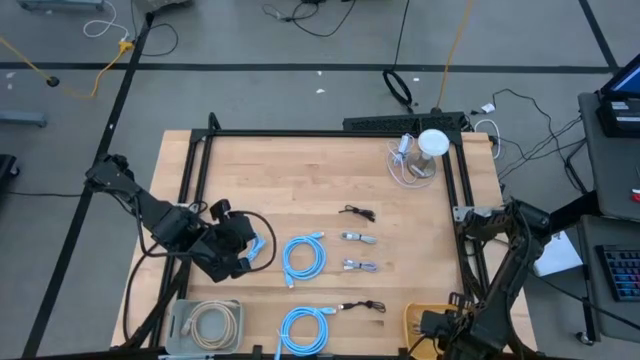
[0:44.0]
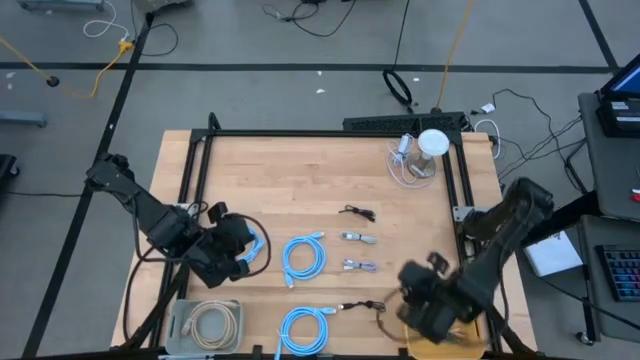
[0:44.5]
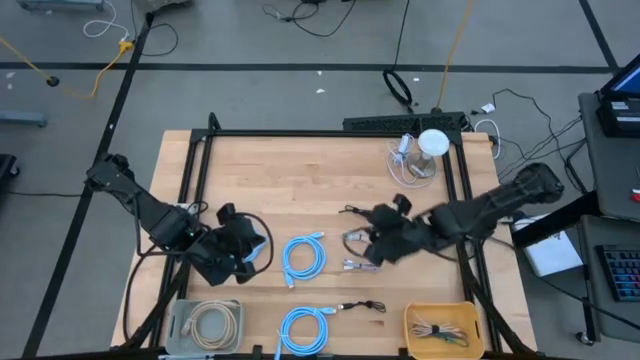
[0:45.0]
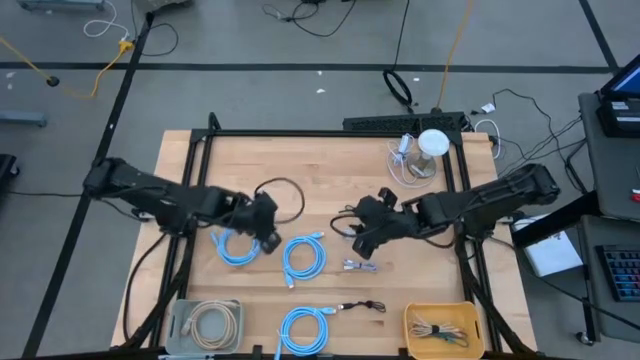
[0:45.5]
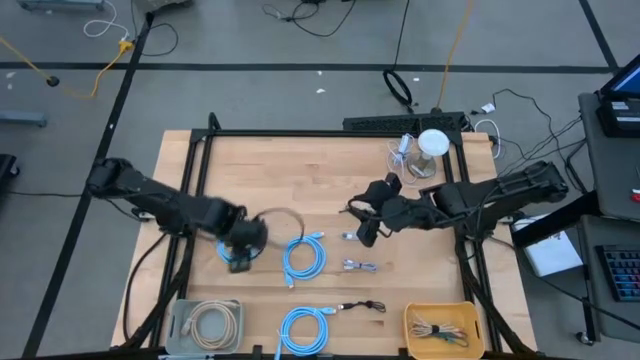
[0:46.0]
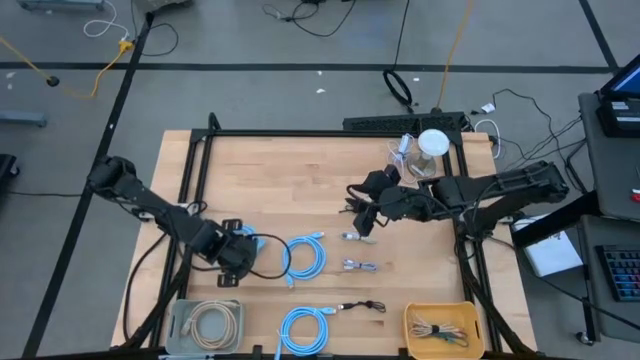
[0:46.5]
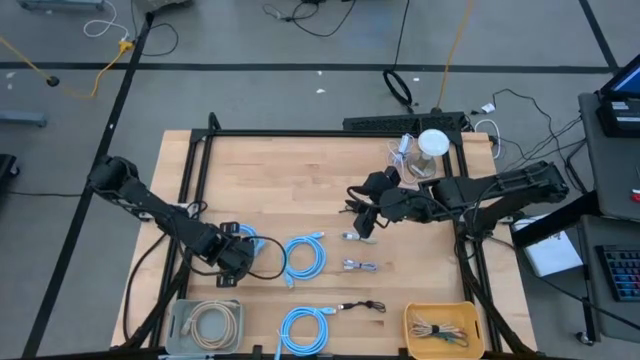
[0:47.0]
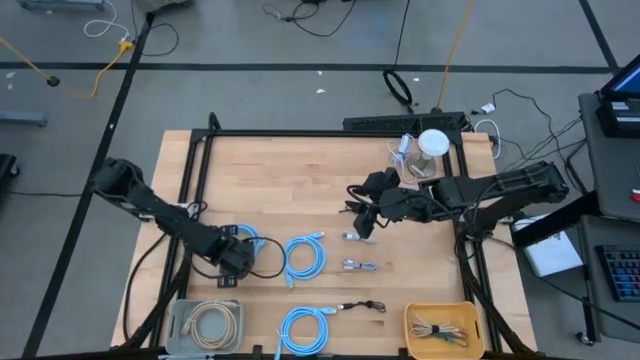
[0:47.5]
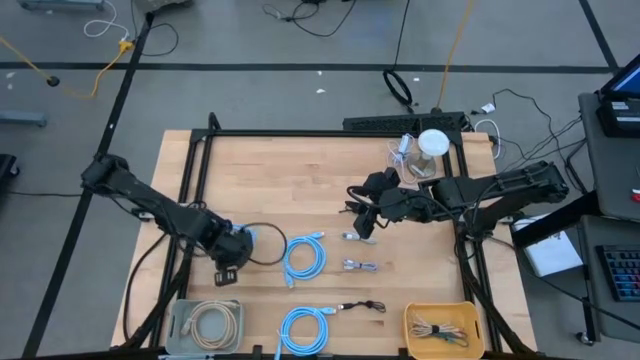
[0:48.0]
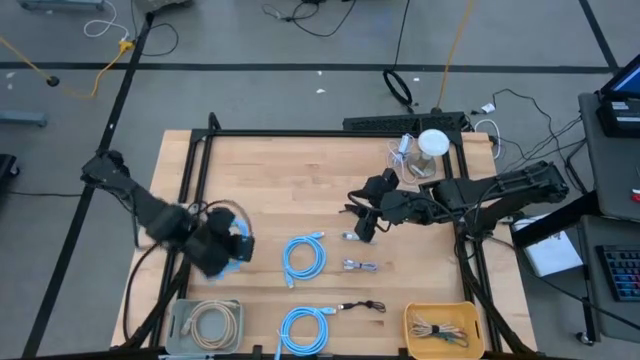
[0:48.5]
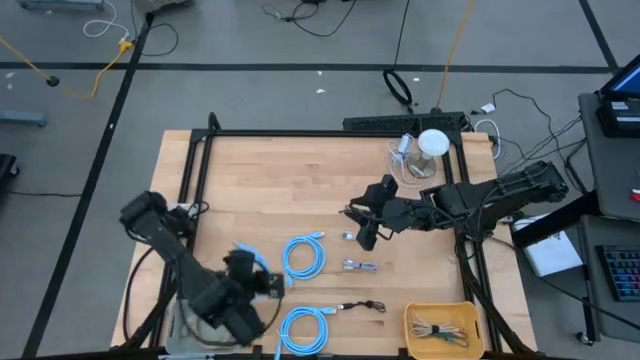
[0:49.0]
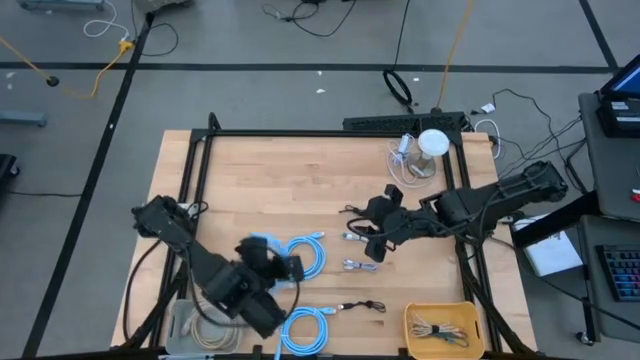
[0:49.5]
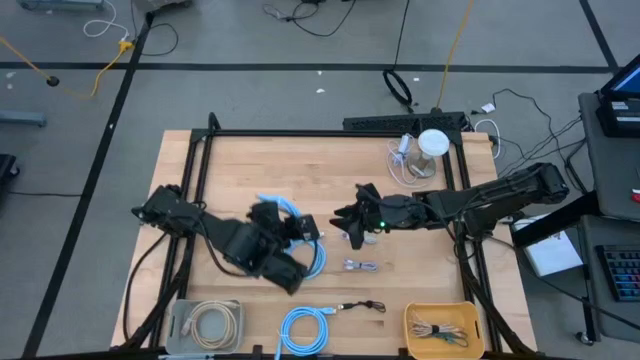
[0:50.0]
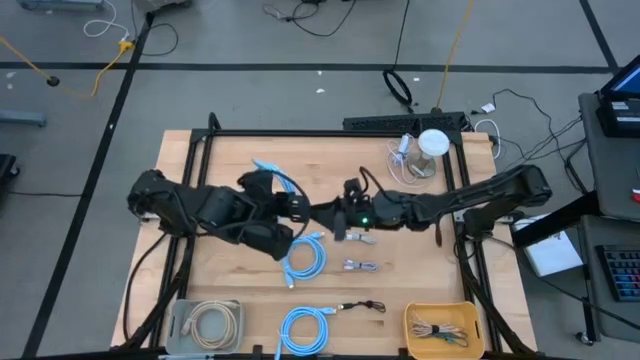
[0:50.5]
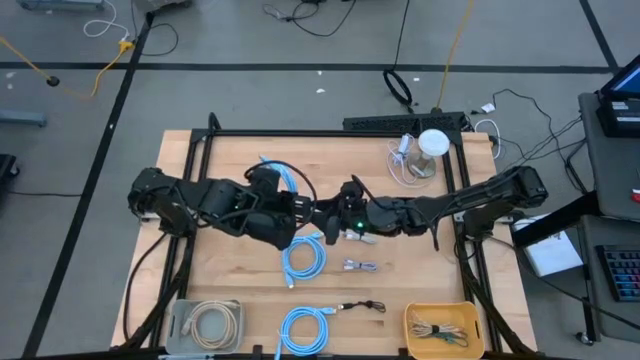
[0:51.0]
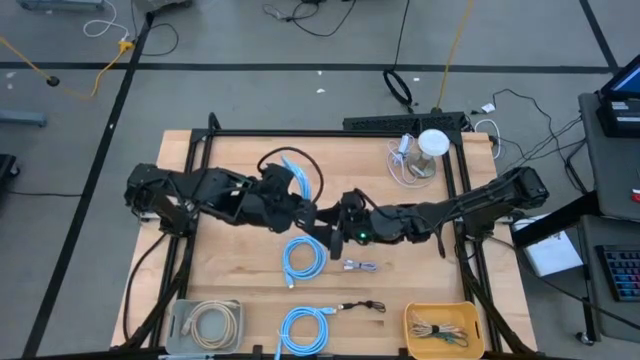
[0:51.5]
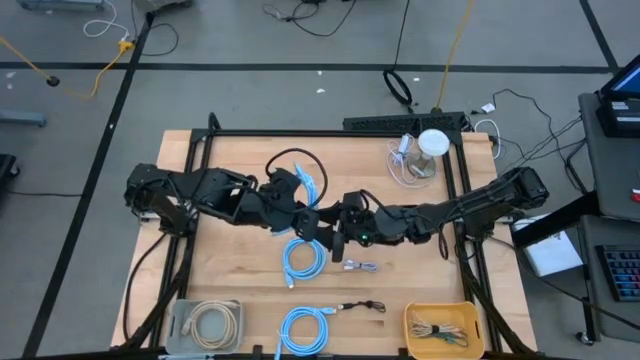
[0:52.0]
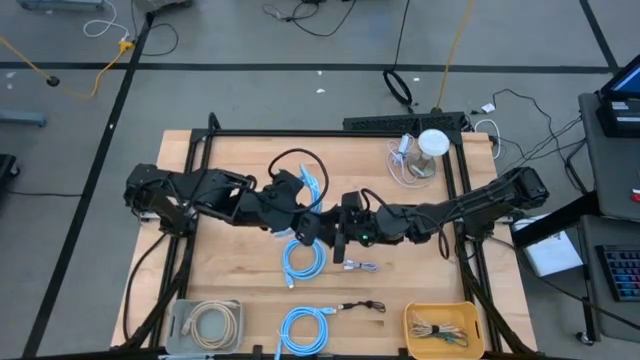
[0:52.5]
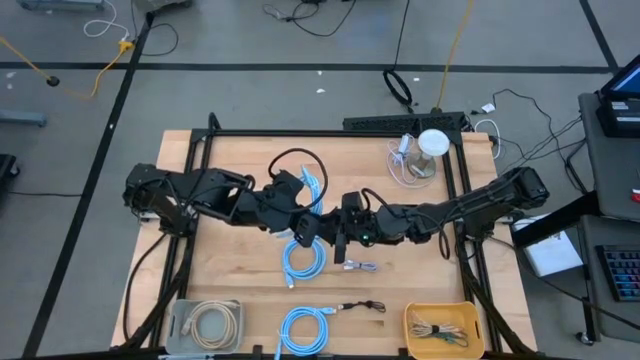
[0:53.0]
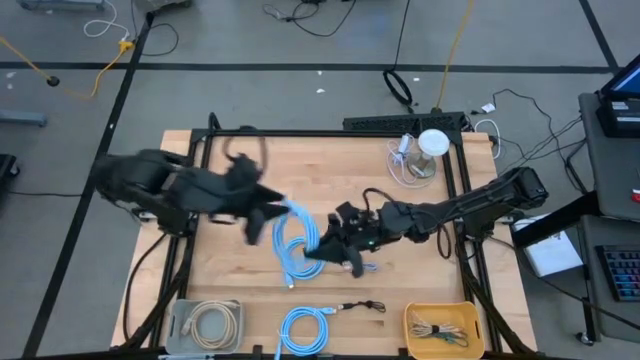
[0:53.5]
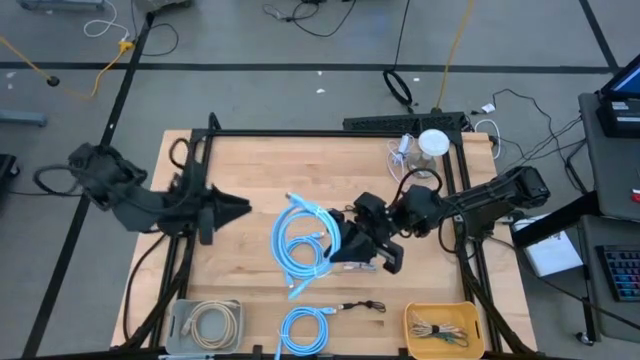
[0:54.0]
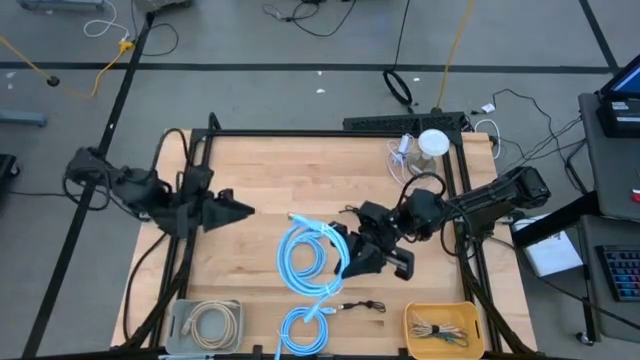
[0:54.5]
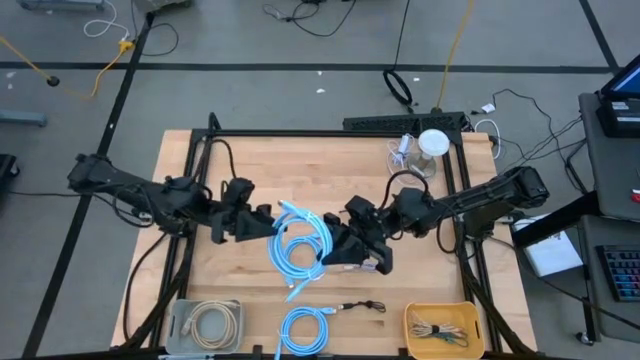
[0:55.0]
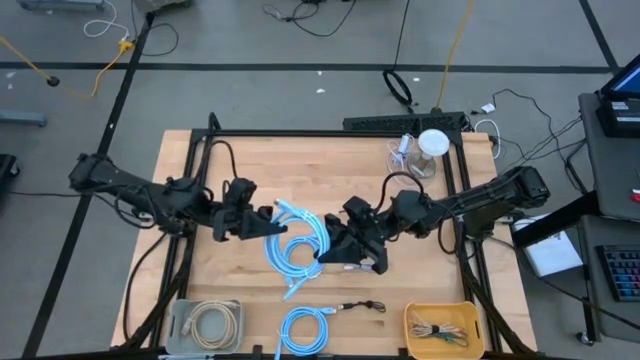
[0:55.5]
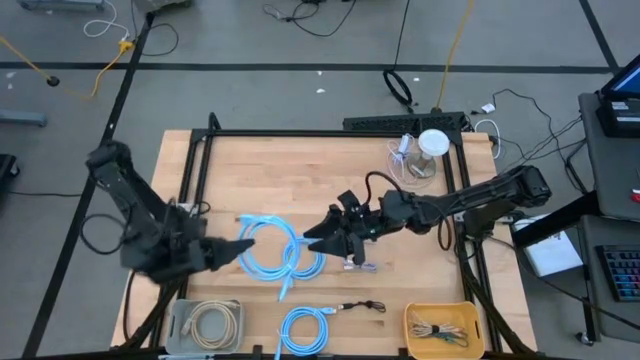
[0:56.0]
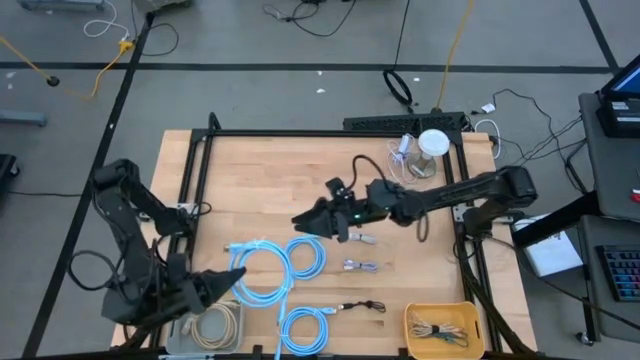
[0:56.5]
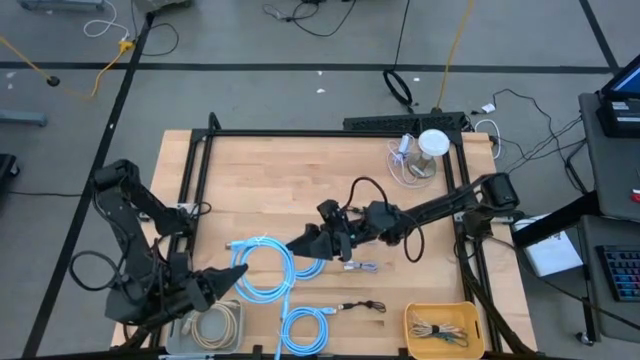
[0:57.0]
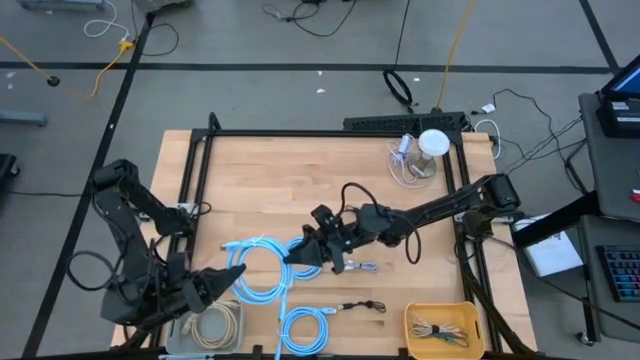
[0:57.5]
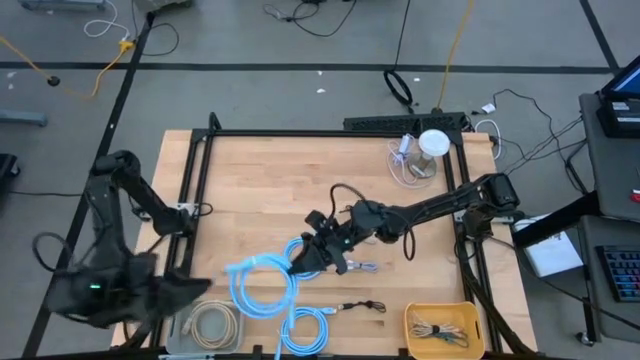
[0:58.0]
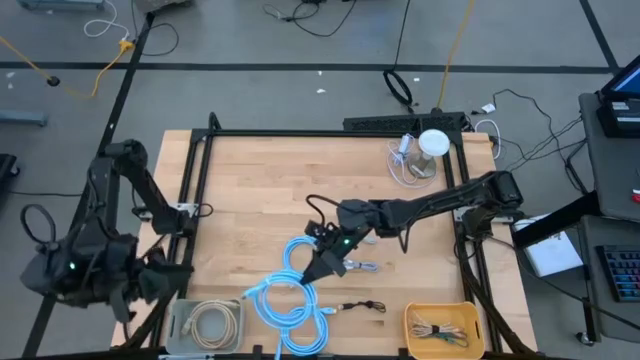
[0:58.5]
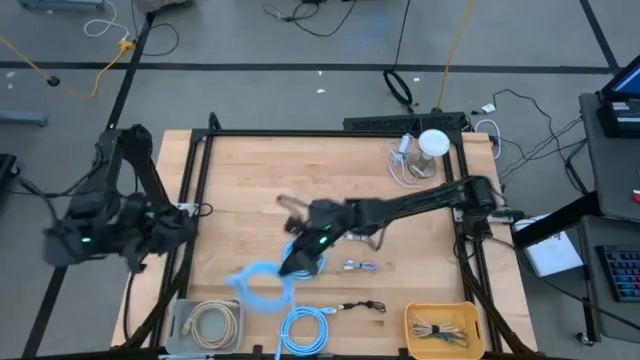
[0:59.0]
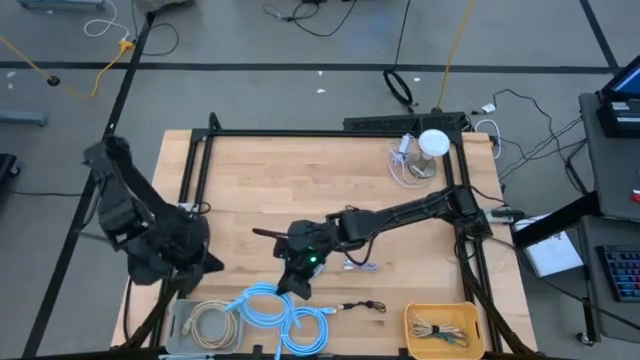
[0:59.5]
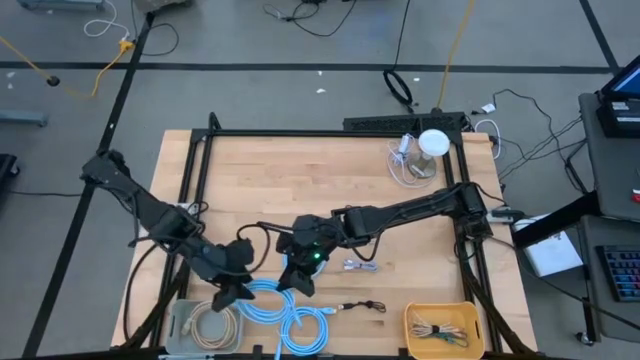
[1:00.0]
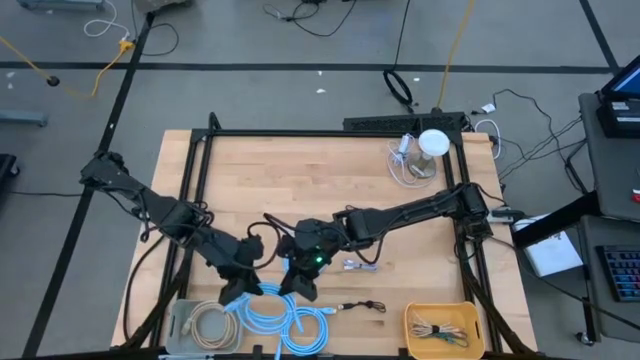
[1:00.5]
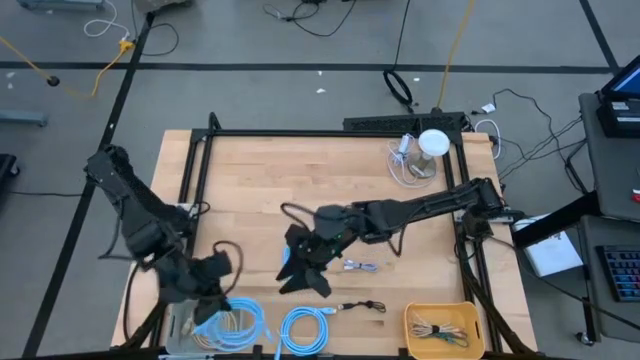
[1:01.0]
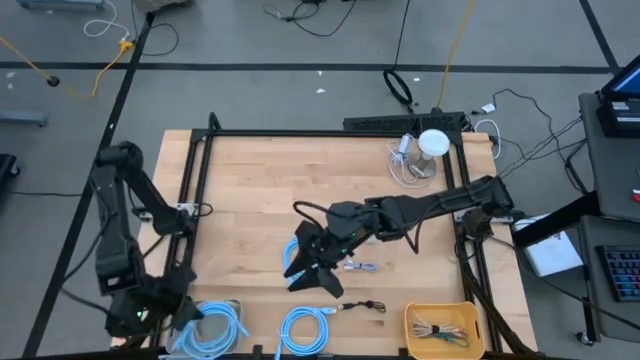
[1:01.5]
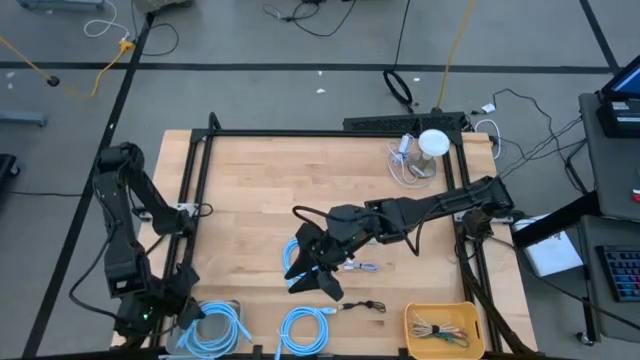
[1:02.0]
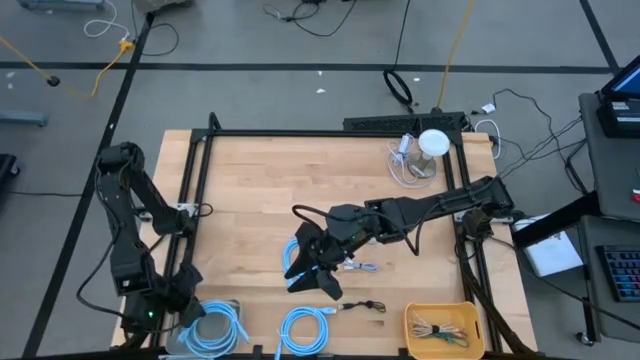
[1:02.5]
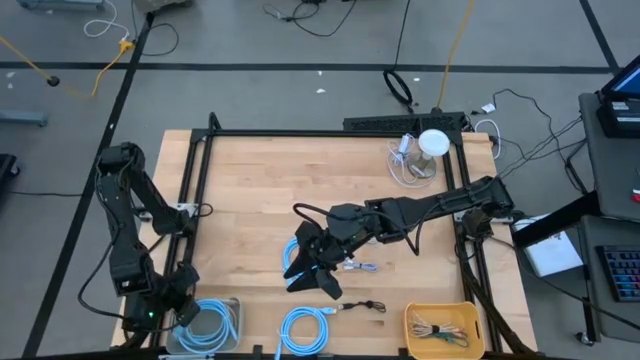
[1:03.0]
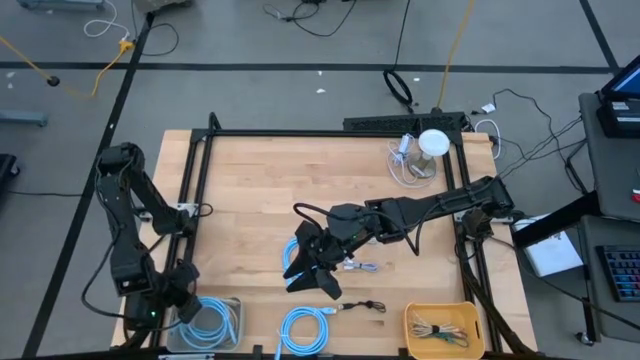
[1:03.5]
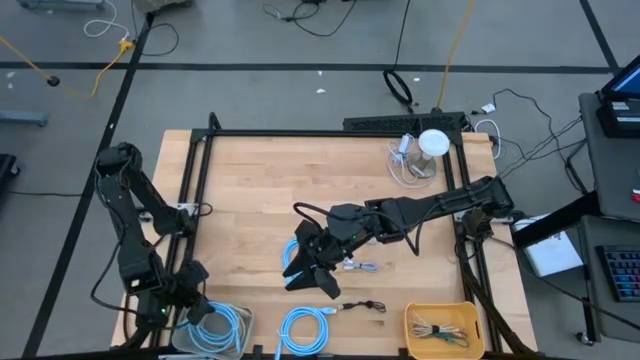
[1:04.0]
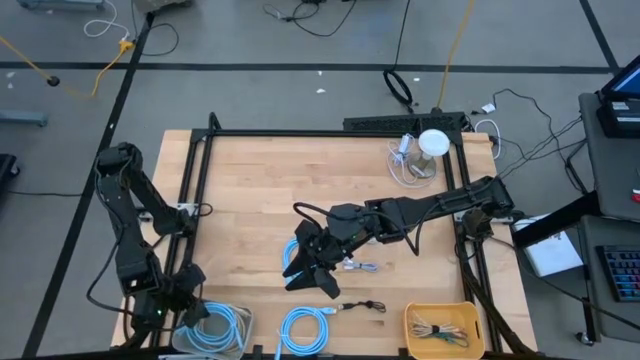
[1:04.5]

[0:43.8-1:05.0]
Task: Pick & Place USB Port
Put the top left HDMI cable into the gray bin

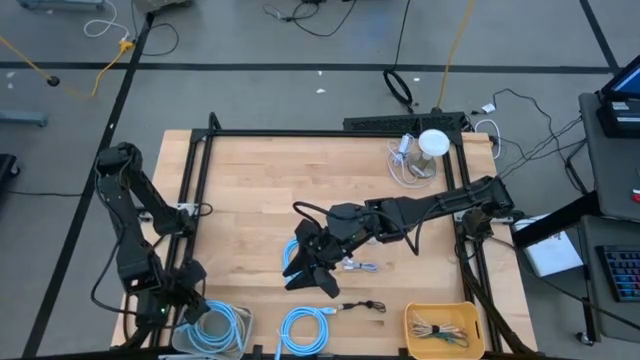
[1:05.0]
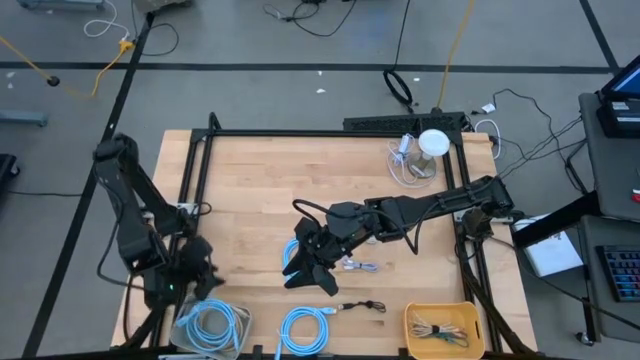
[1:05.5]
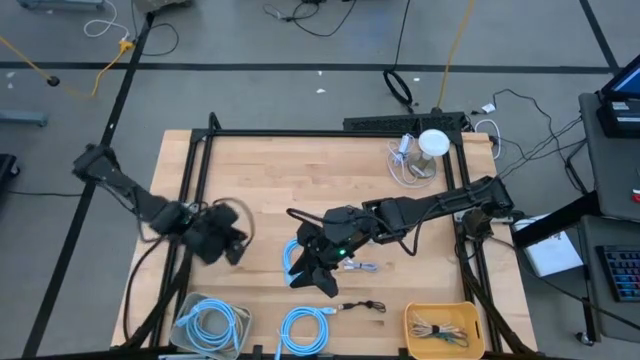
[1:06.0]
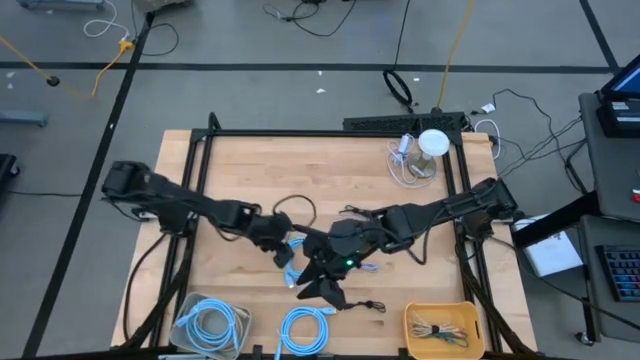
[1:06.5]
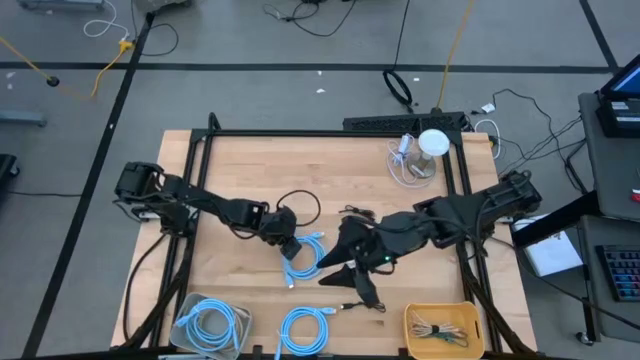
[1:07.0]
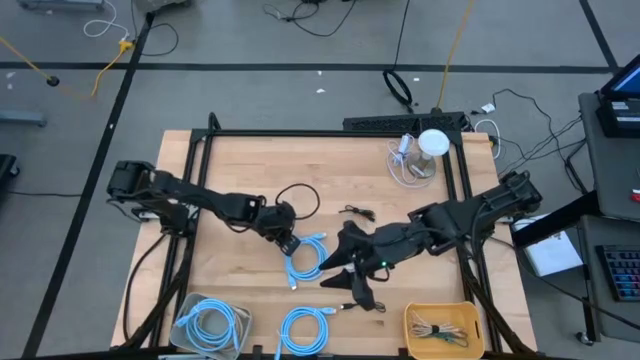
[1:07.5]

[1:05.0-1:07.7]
Put the top light blue HDMI cable into the gray bin
